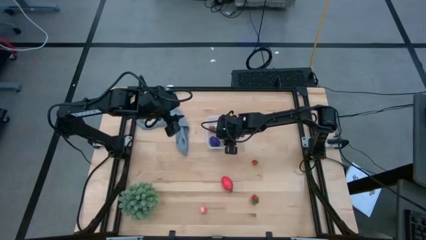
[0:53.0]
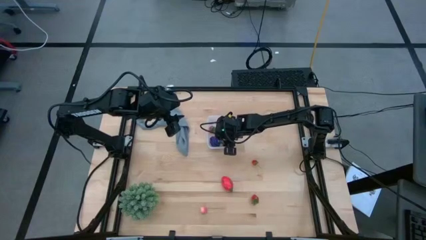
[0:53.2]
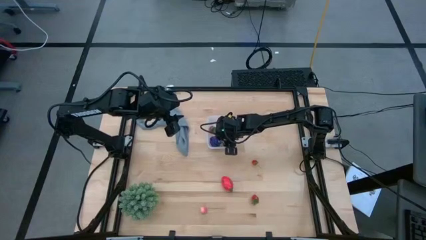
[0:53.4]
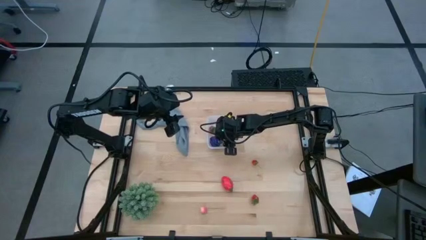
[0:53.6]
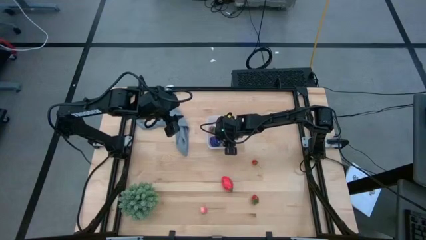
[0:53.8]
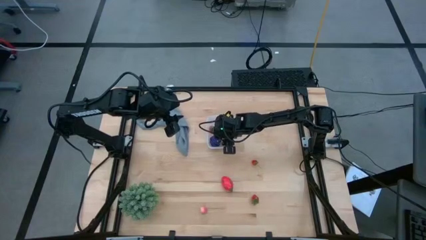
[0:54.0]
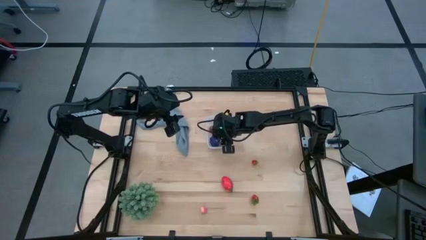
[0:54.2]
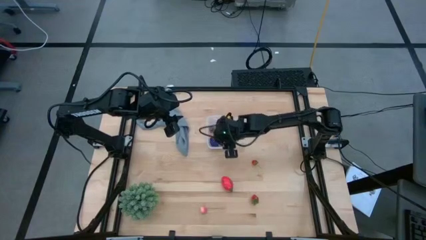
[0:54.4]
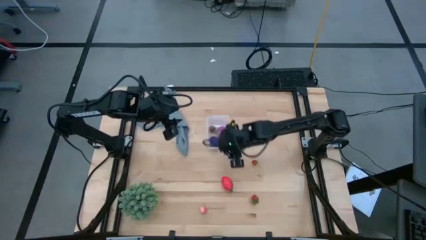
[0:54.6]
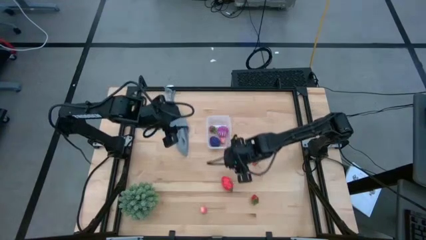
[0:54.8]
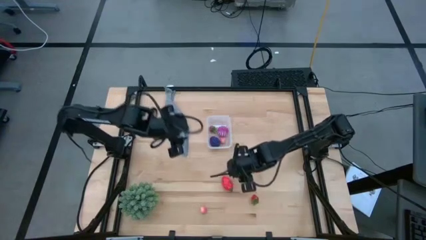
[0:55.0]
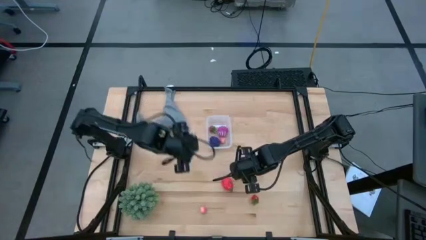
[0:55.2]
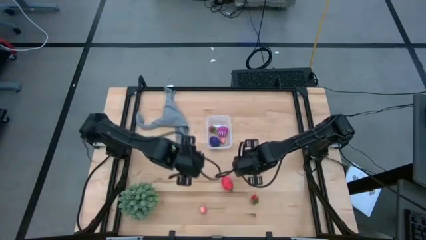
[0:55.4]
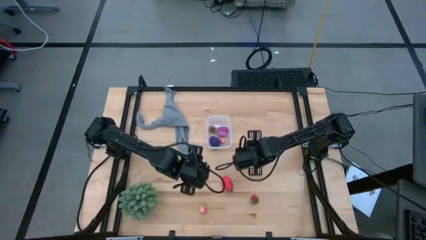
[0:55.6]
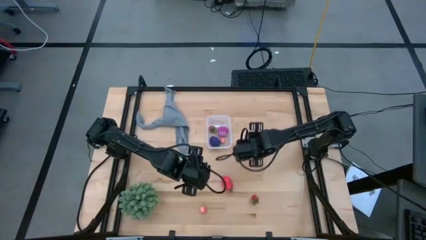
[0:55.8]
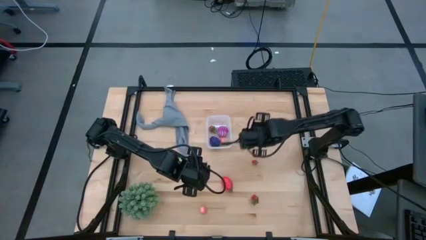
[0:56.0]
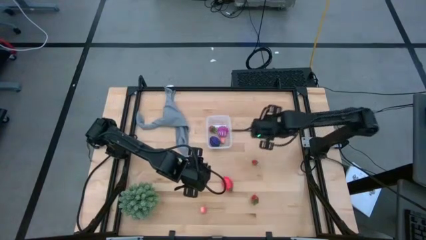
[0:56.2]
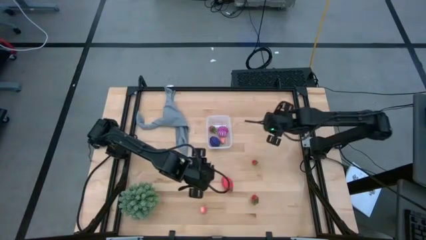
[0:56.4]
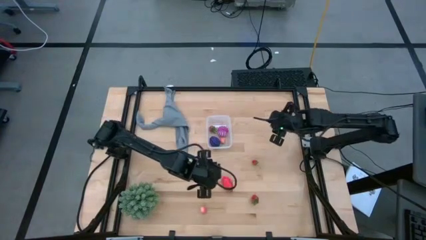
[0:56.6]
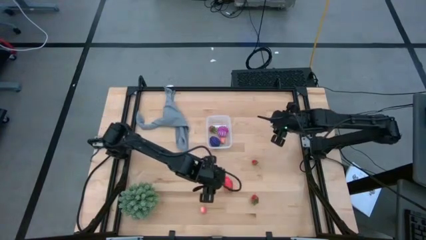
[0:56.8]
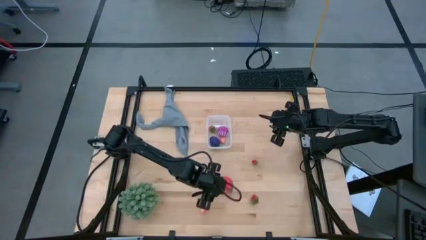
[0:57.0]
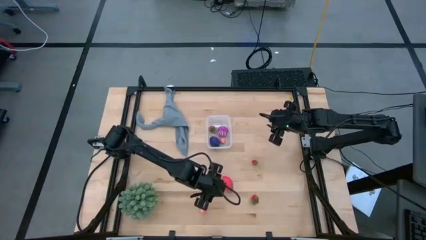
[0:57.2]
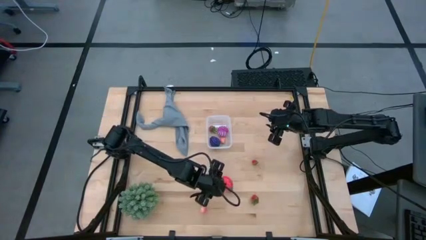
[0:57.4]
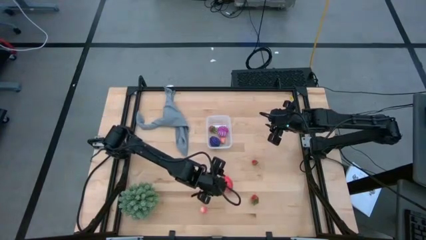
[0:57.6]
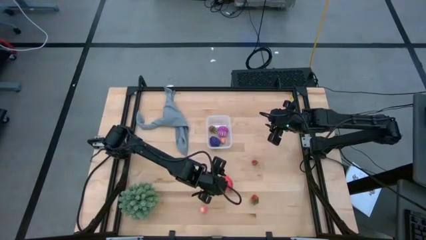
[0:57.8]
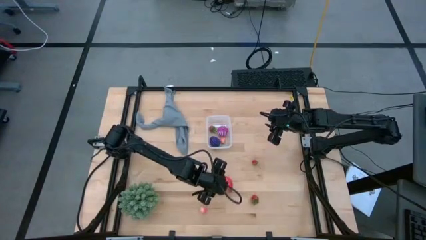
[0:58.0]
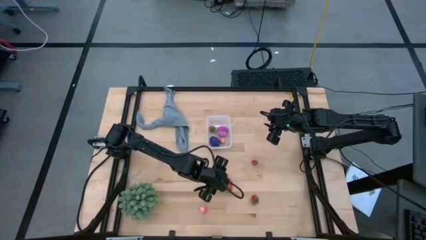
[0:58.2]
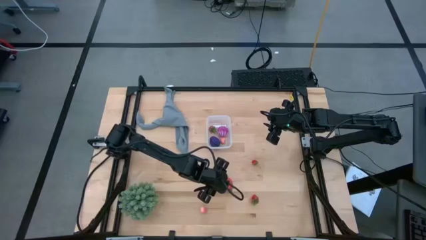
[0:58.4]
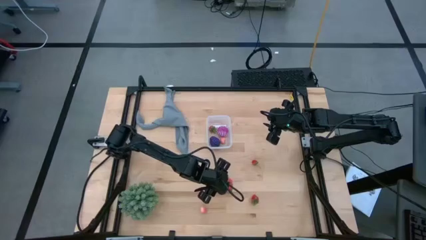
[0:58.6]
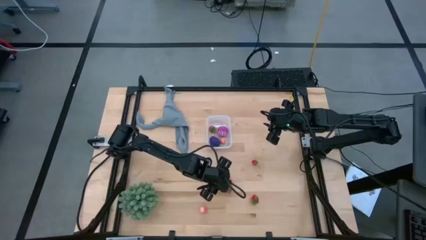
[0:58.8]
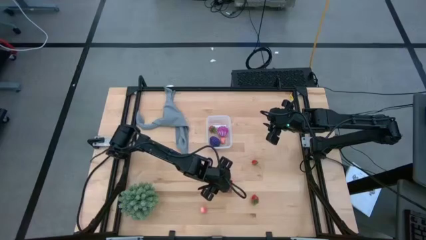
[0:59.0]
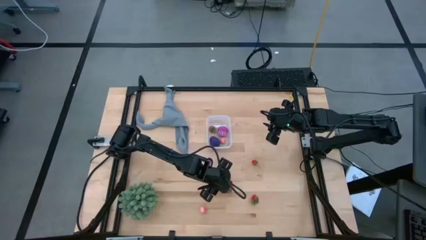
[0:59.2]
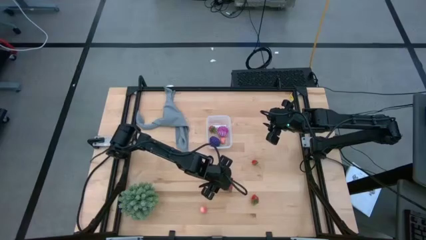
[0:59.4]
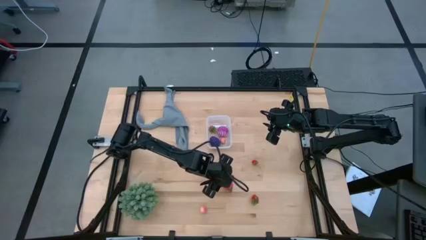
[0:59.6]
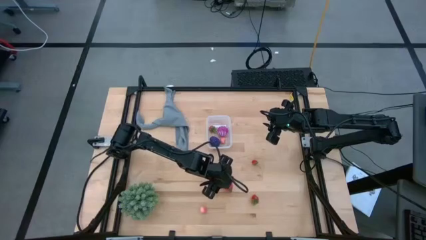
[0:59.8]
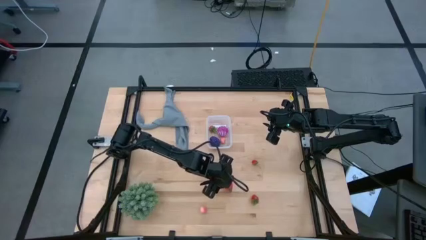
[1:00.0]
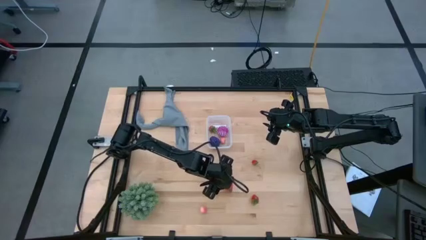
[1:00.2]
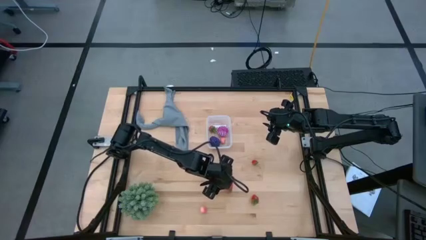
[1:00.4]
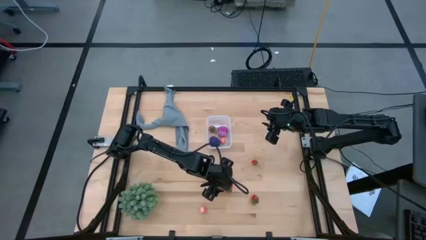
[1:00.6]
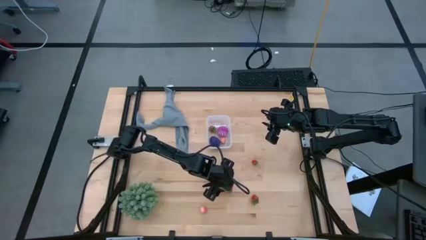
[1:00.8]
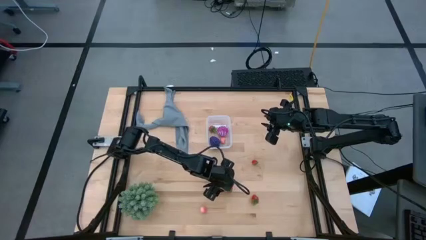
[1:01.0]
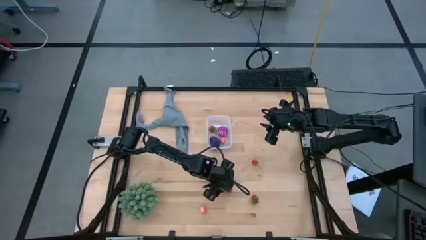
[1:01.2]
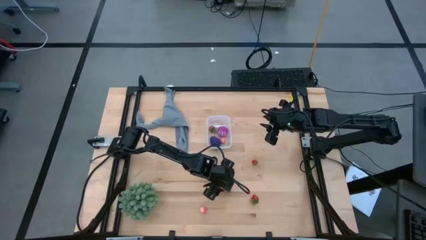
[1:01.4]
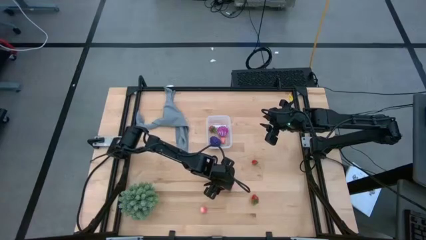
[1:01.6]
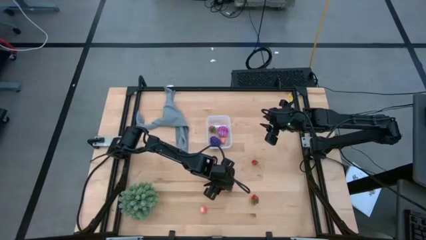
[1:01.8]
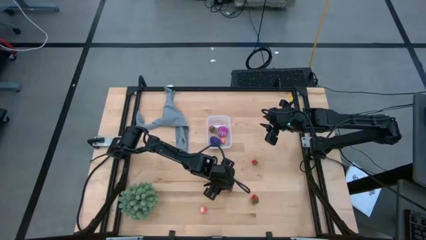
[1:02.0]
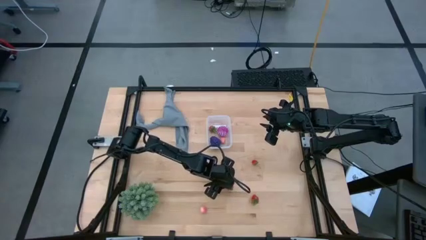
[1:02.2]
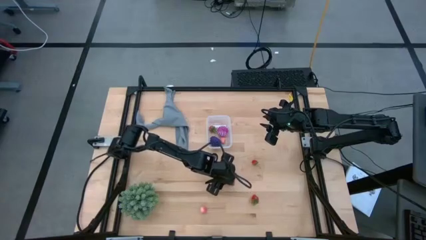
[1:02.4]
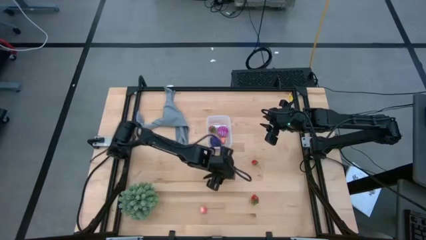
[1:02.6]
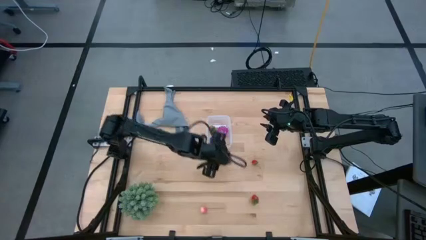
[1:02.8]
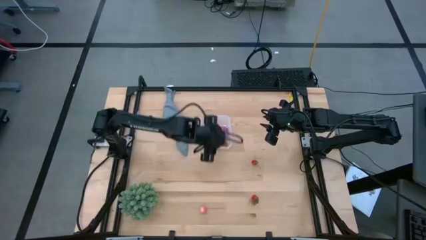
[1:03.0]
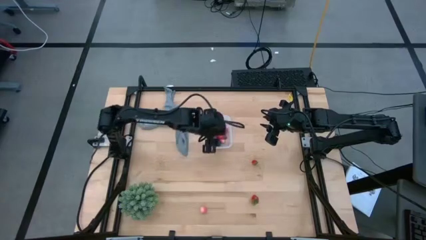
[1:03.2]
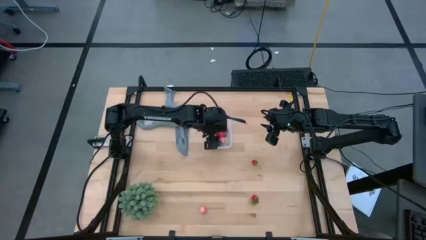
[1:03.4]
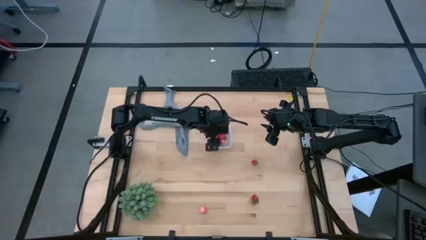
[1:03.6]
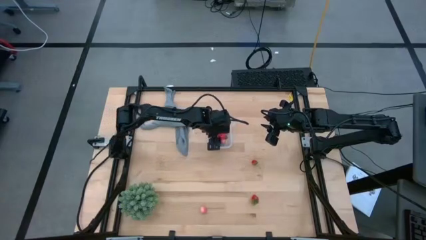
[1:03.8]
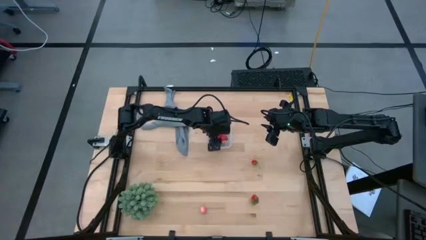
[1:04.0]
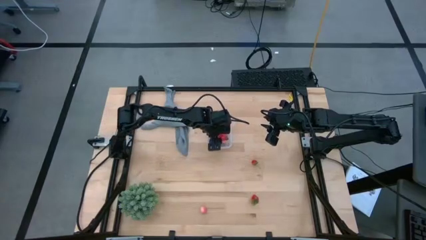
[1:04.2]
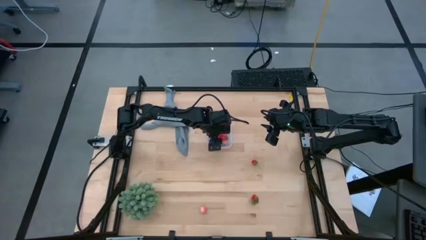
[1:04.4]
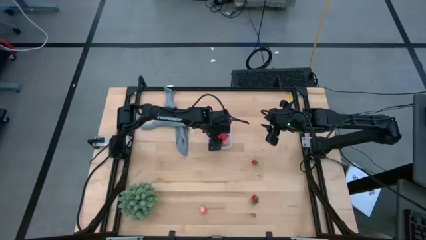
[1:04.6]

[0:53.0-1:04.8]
Task: Pick and placing Produce into tupperware
Put the red dragon fruit into the transparent bin
